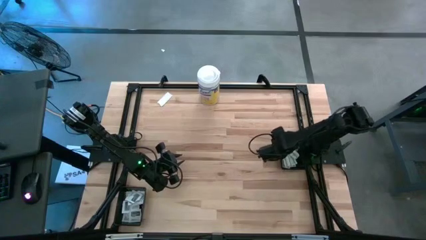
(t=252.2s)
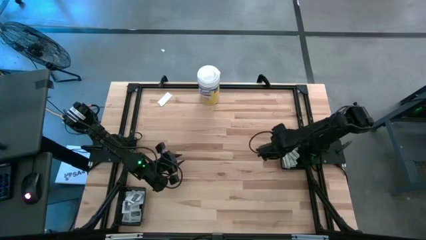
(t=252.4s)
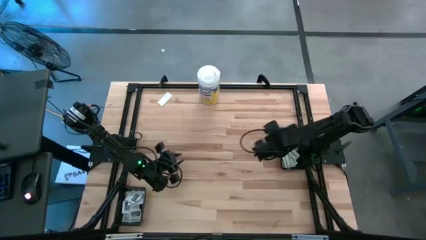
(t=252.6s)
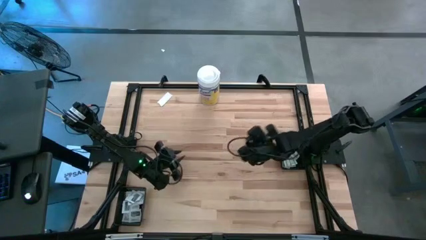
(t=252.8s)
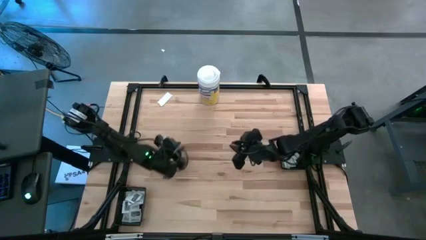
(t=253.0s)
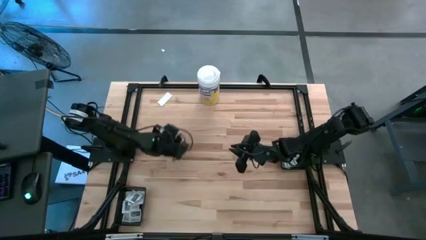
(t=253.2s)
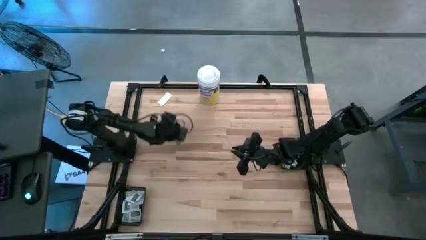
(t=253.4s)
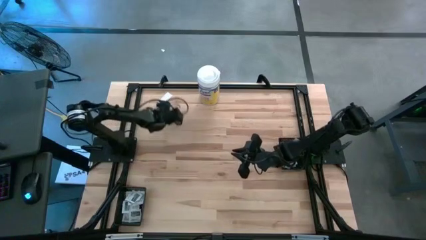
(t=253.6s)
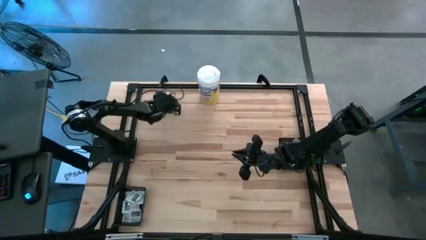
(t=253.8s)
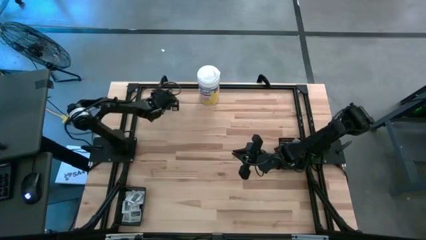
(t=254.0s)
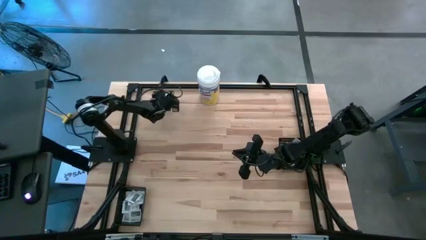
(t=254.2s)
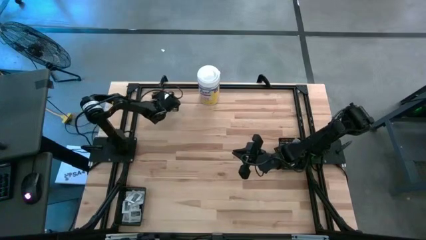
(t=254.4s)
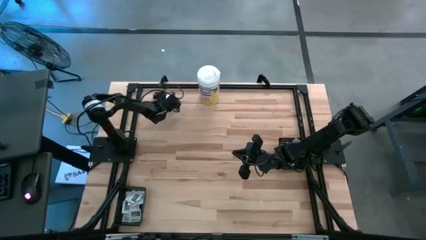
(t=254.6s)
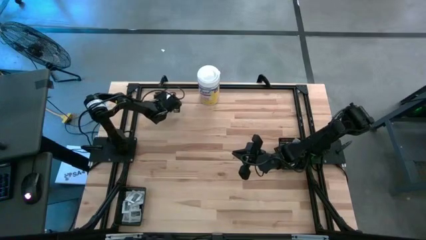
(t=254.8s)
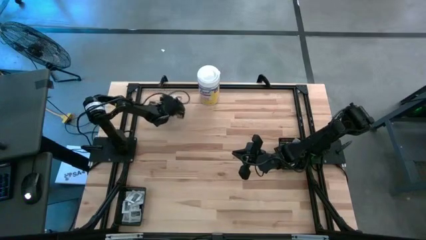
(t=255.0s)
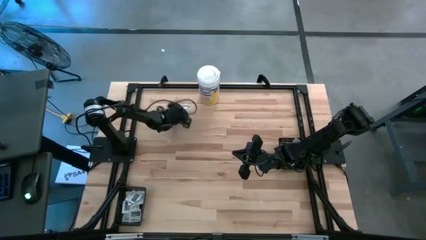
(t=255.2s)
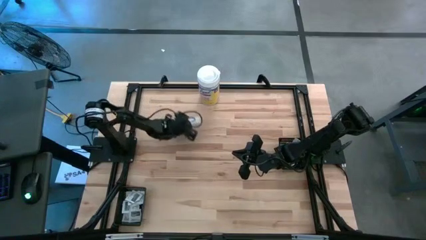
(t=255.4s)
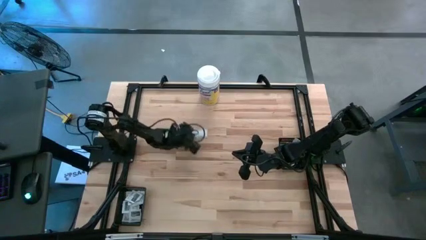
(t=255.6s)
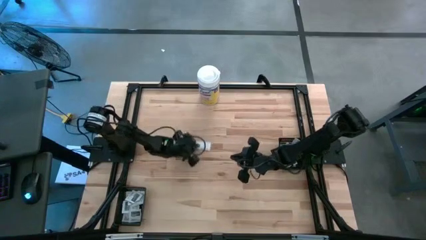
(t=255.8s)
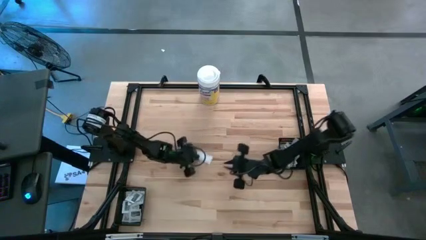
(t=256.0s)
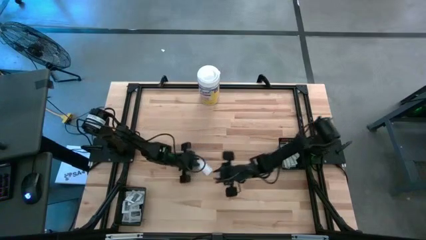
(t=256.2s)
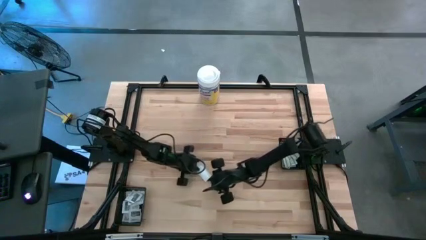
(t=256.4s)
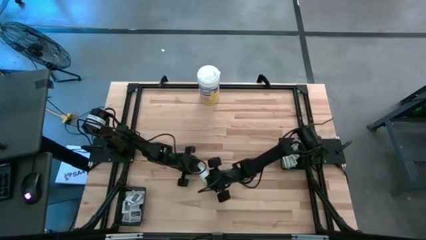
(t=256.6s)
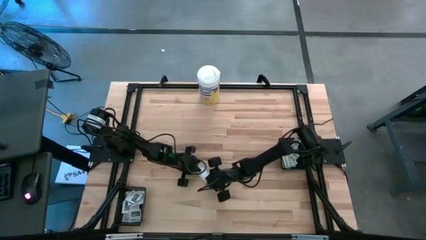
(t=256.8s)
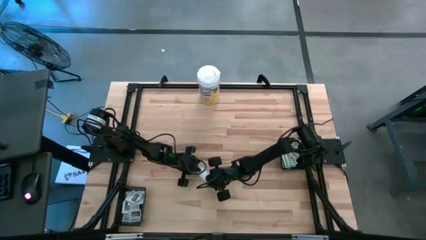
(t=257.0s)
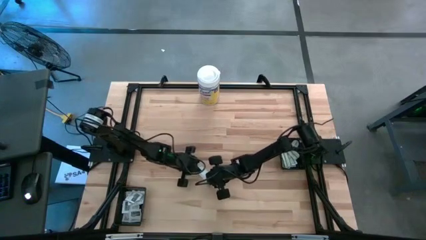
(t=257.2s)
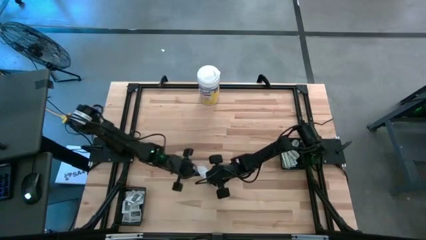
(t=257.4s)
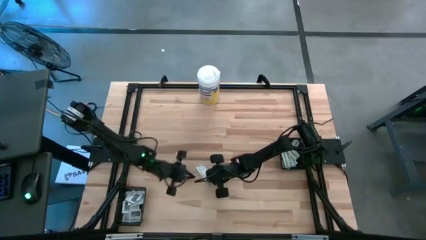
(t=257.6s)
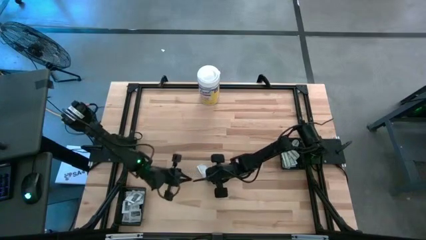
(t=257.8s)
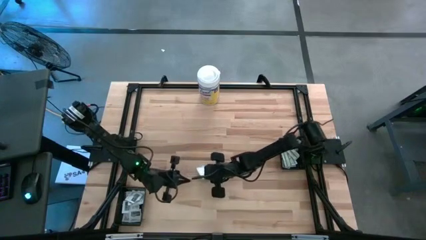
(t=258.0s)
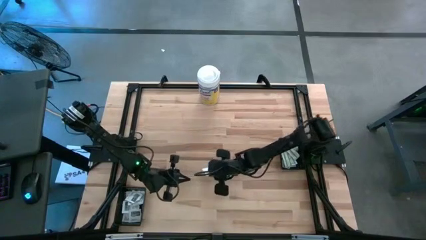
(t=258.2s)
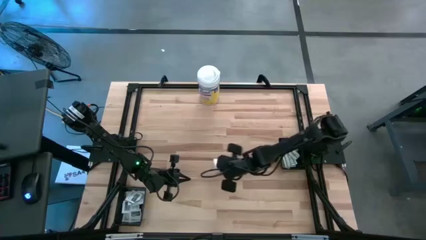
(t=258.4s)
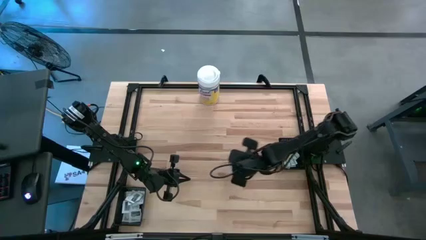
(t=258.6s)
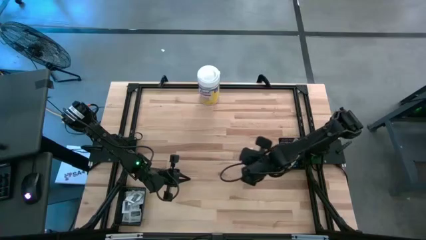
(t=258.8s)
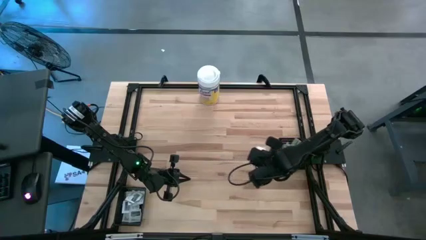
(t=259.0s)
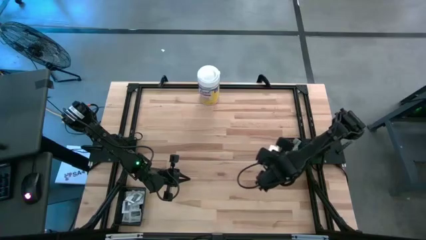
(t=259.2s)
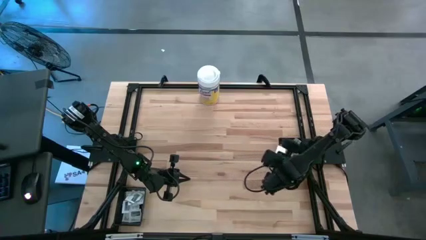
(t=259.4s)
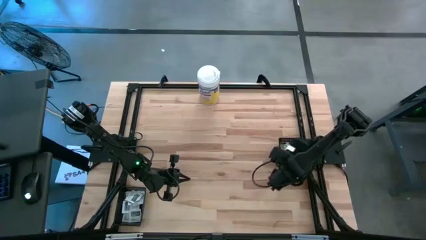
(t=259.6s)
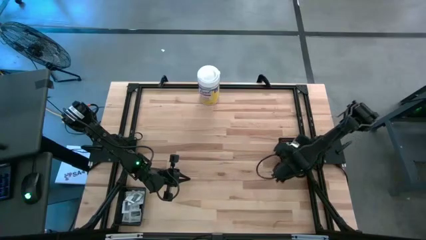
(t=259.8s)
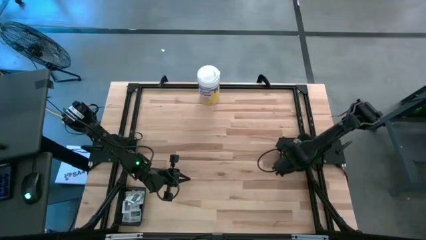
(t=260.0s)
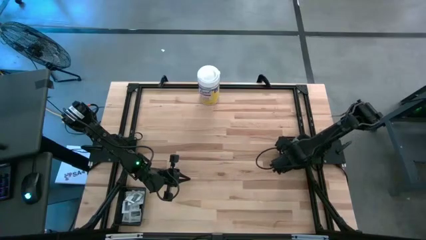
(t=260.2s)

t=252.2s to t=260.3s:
Task: Pick & Place First Aid Supplies
Put the white bandage pad into the right black bin

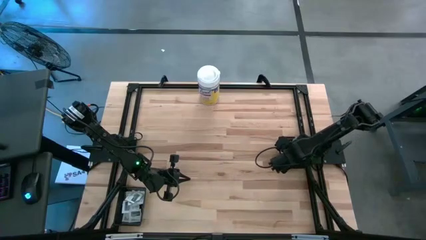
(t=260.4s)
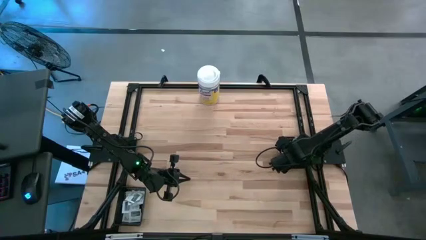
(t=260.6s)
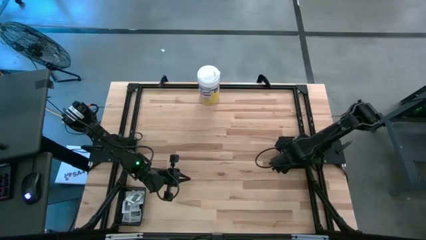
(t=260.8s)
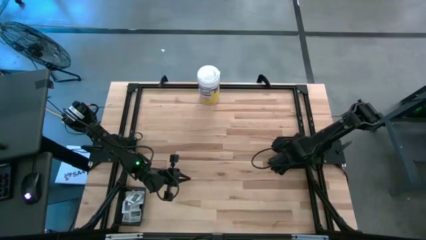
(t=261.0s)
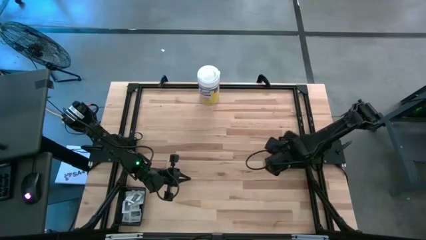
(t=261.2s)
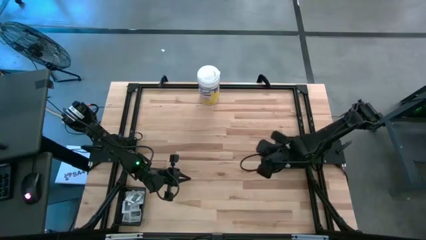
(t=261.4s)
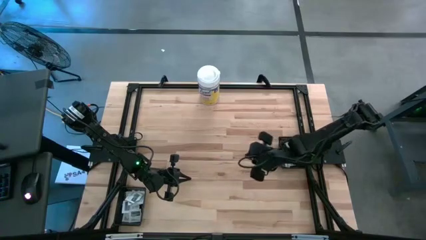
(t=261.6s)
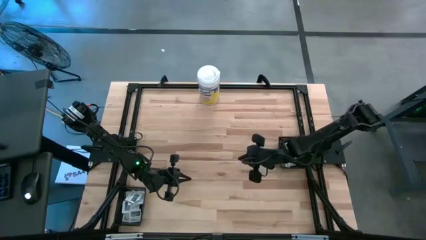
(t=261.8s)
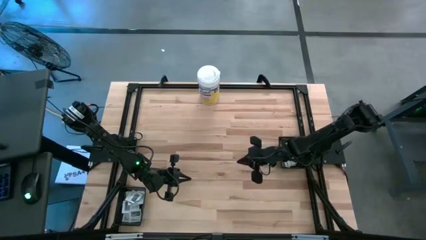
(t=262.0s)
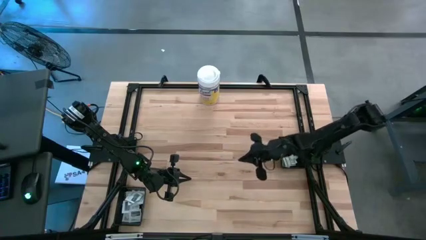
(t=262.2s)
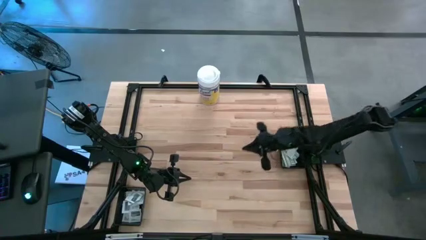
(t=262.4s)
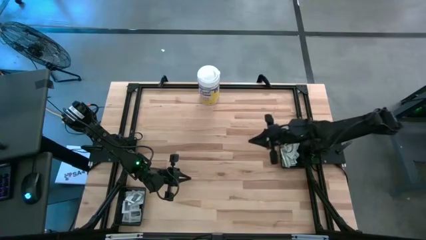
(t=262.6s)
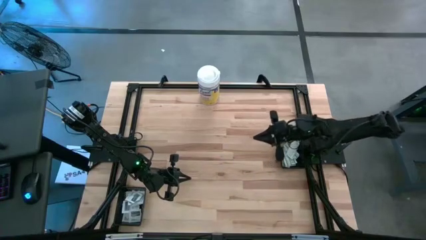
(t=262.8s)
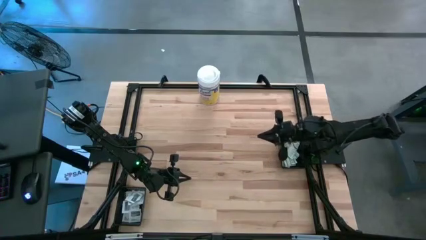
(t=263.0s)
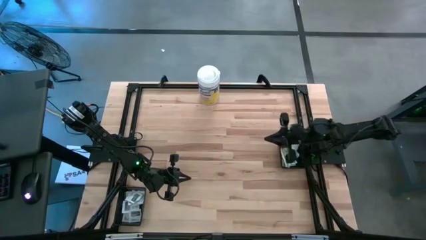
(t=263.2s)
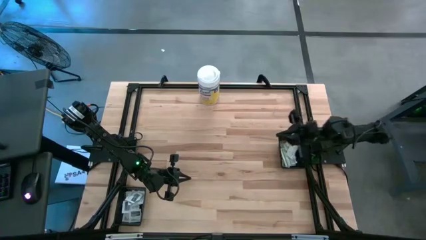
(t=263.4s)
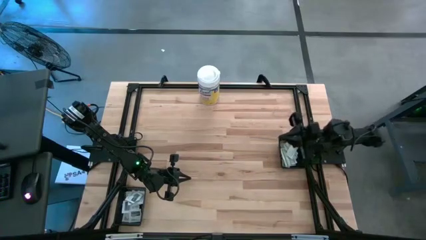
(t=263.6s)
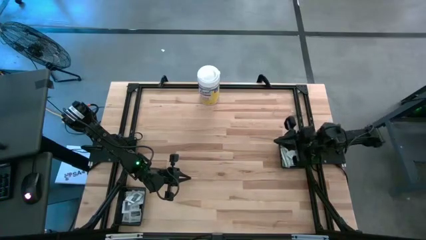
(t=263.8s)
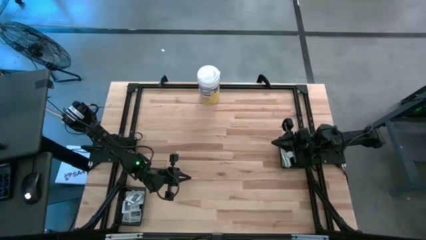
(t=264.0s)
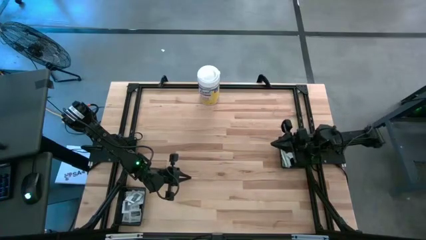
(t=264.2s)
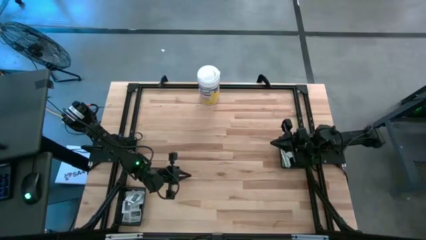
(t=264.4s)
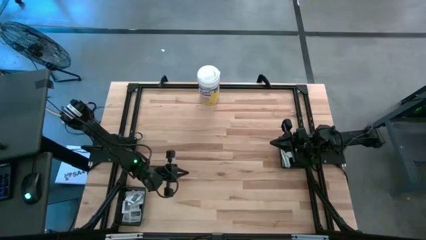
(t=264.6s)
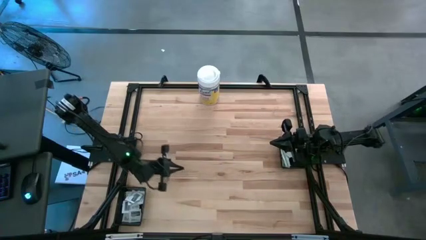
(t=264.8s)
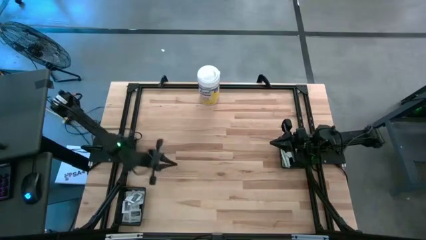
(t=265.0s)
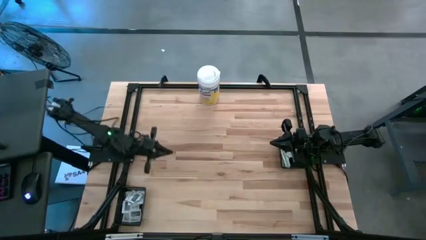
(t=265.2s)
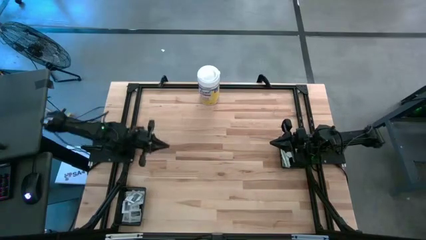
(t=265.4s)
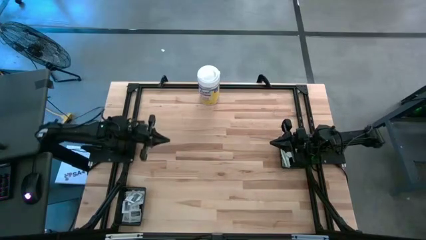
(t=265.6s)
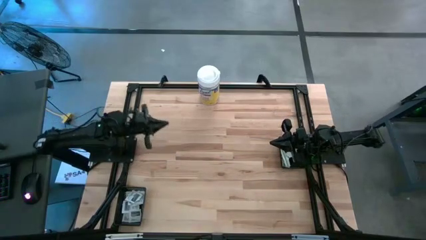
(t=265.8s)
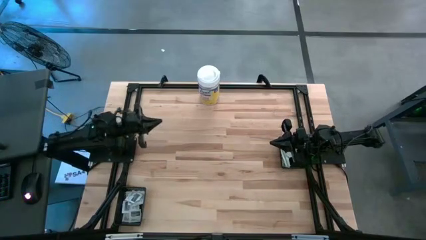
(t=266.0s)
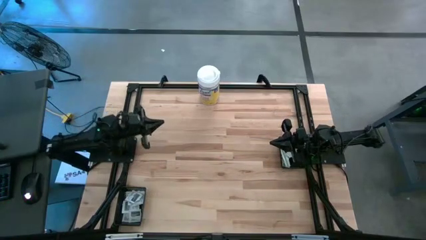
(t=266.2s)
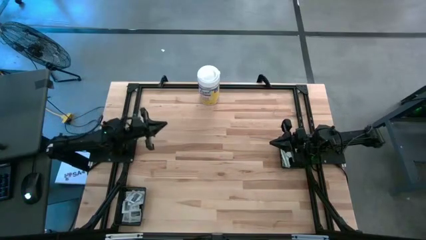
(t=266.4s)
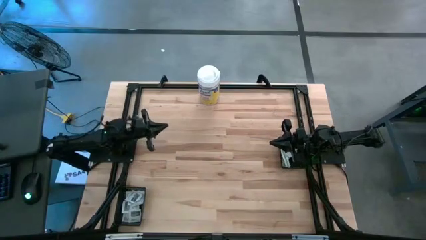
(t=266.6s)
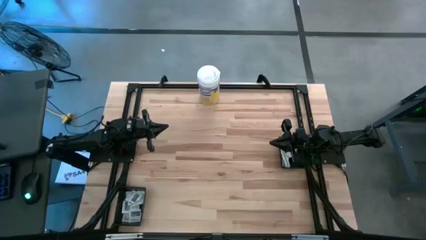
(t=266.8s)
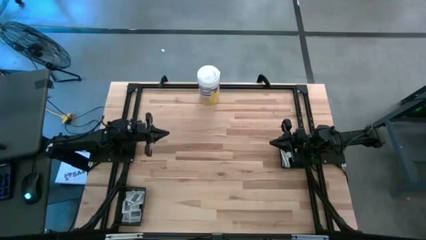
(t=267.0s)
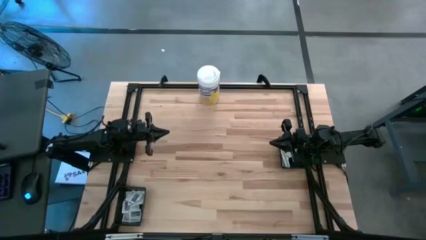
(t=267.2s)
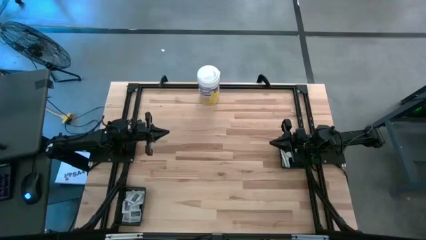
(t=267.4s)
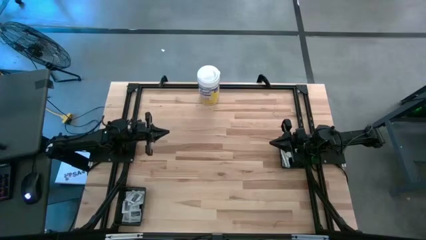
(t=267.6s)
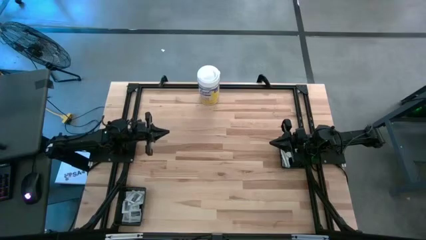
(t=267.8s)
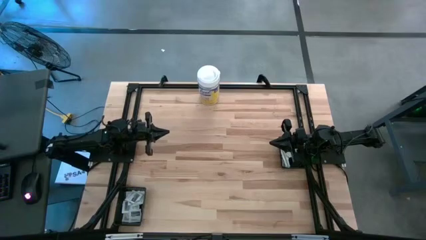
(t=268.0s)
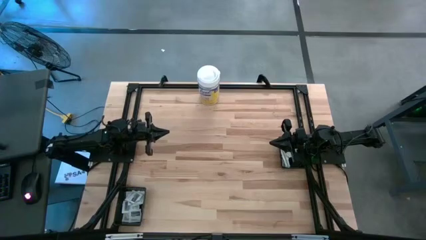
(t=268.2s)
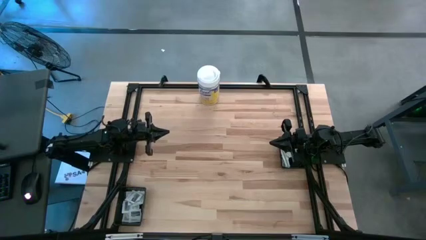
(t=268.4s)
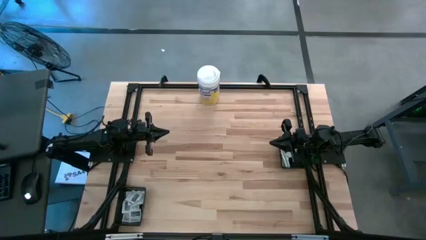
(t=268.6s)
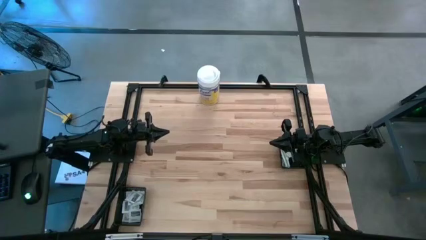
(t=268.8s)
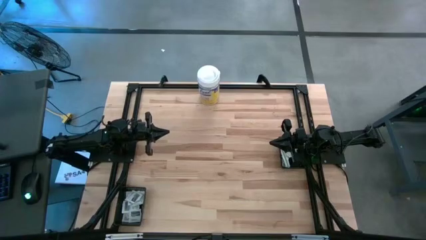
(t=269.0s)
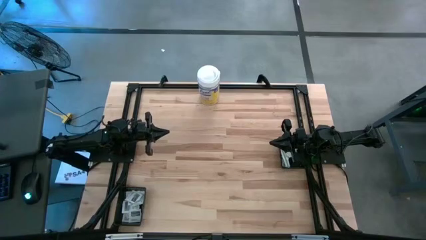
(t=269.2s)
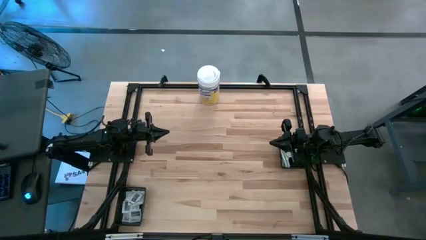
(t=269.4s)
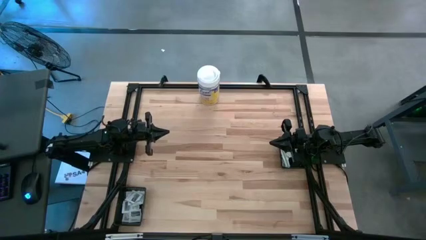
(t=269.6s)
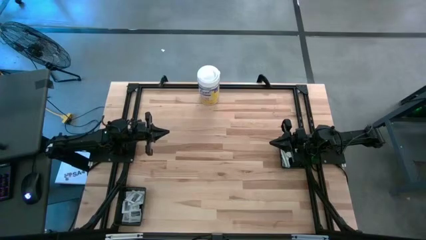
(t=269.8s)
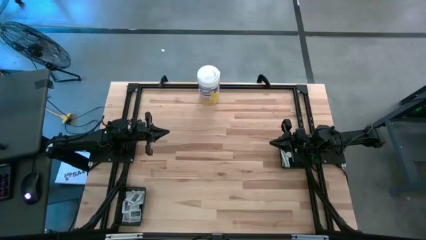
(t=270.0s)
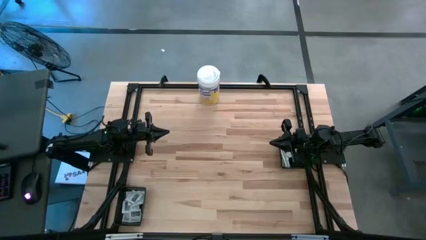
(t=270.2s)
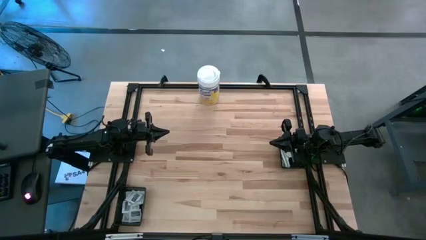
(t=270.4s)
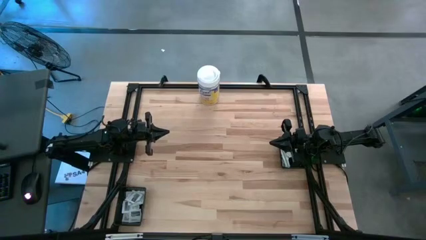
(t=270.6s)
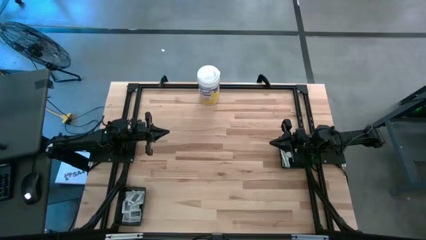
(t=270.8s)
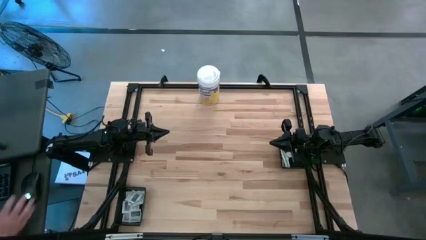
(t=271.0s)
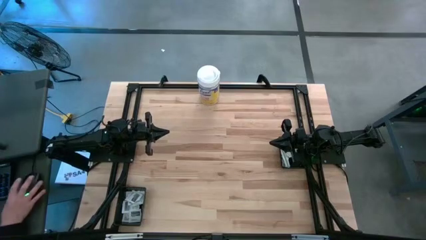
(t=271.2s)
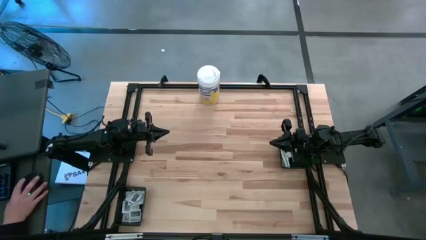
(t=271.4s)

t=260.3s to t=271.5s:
Return to Home Position
